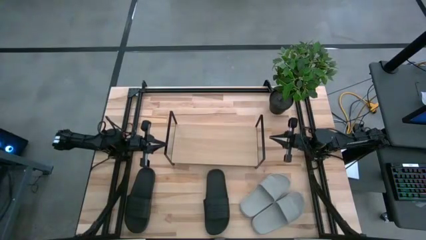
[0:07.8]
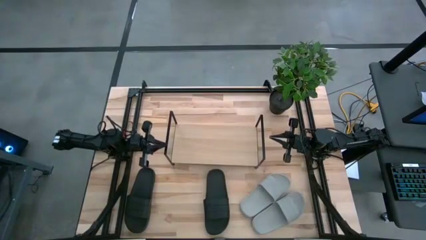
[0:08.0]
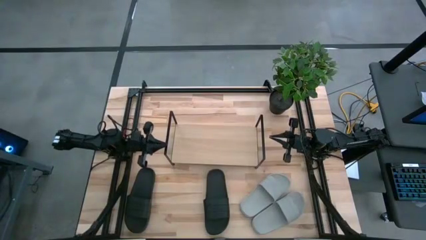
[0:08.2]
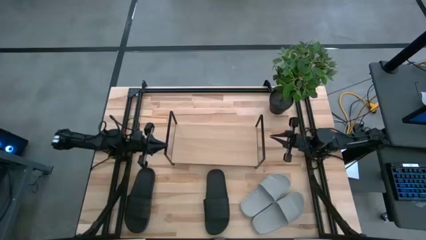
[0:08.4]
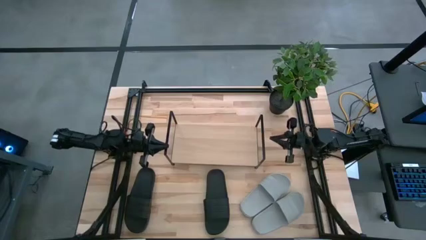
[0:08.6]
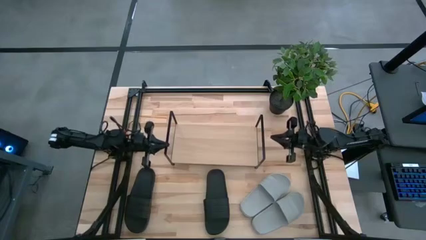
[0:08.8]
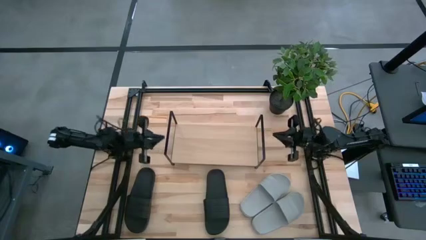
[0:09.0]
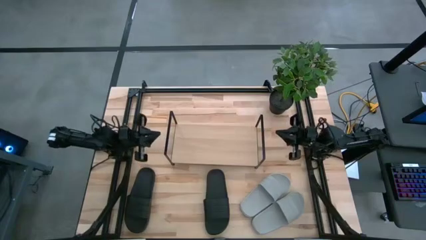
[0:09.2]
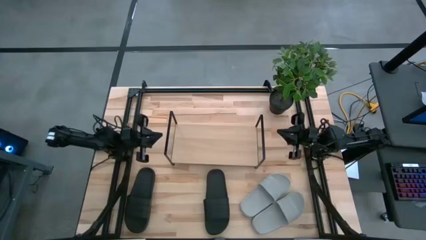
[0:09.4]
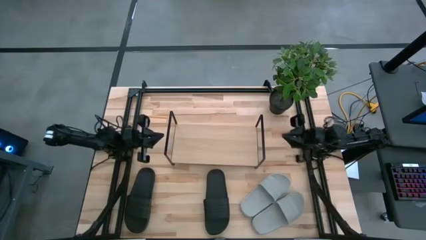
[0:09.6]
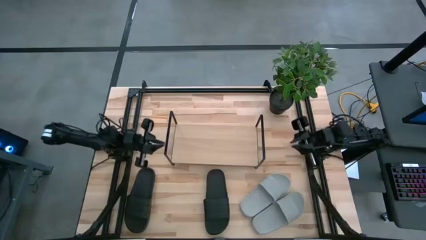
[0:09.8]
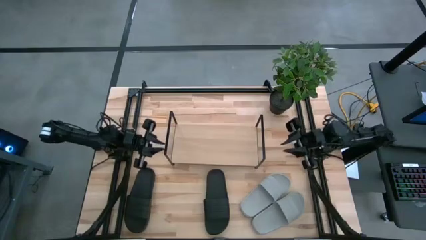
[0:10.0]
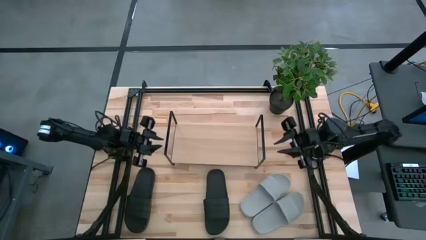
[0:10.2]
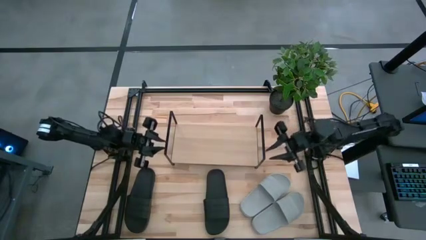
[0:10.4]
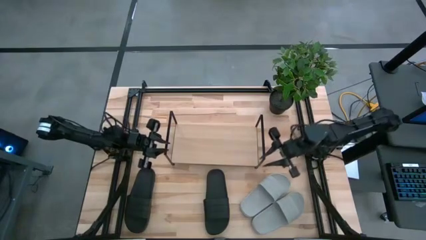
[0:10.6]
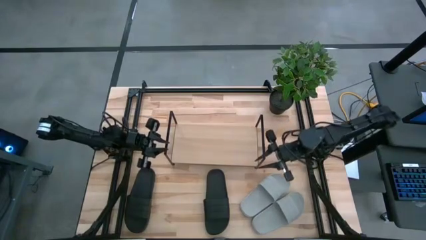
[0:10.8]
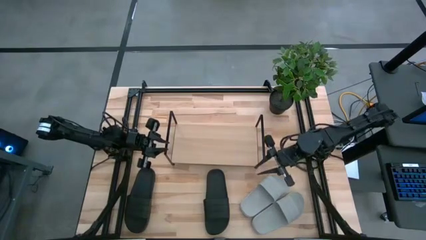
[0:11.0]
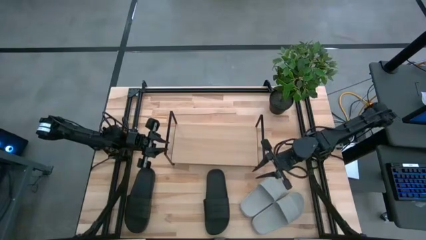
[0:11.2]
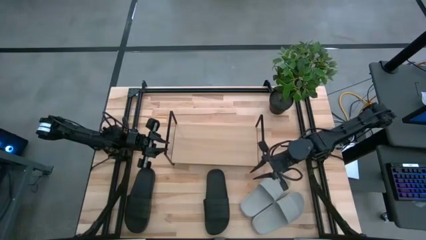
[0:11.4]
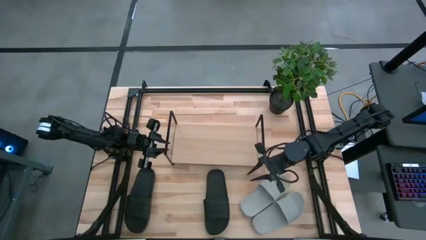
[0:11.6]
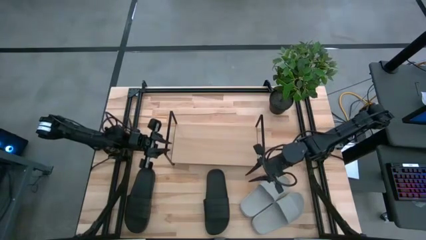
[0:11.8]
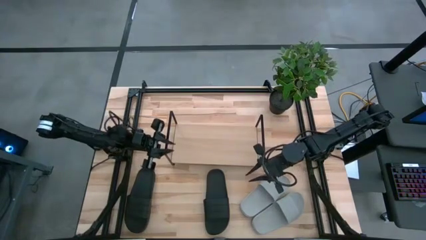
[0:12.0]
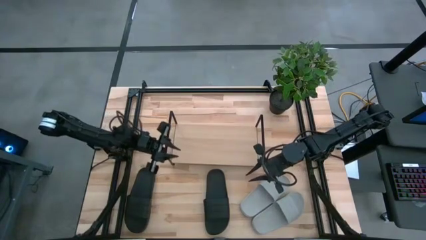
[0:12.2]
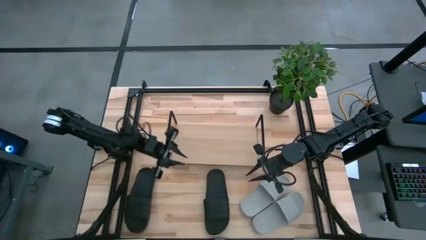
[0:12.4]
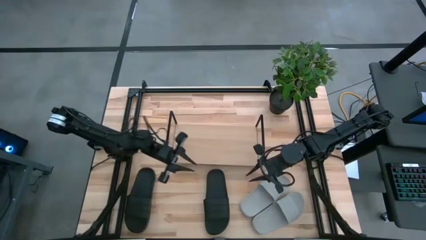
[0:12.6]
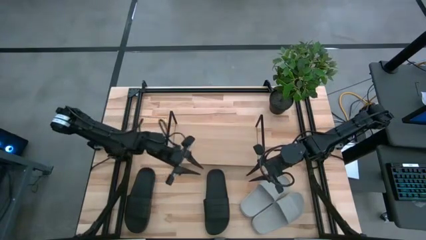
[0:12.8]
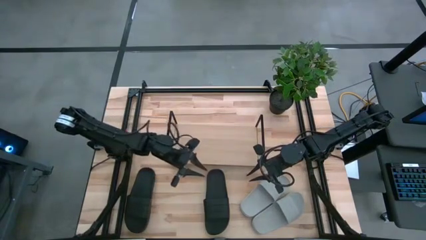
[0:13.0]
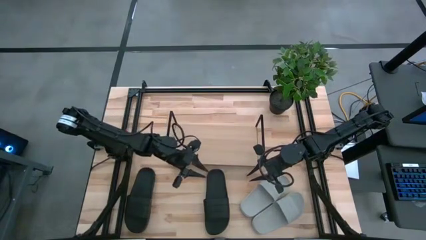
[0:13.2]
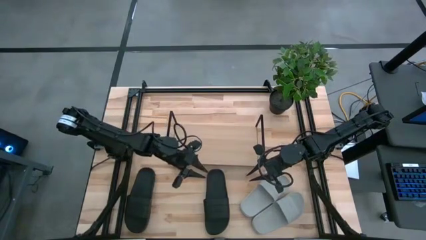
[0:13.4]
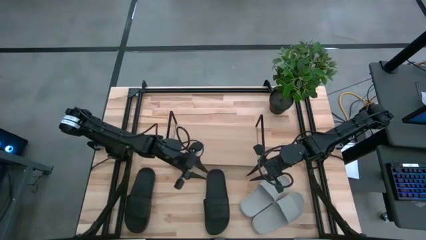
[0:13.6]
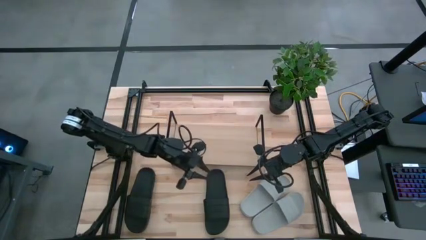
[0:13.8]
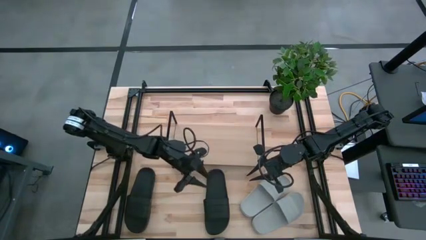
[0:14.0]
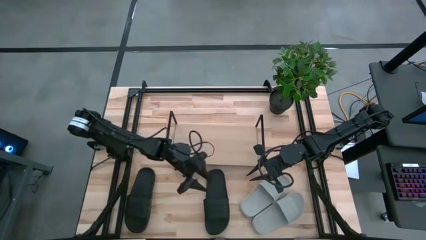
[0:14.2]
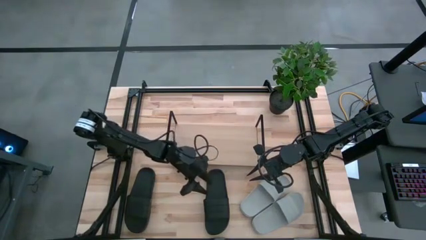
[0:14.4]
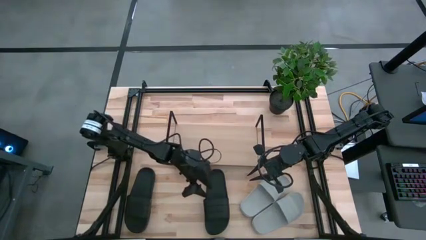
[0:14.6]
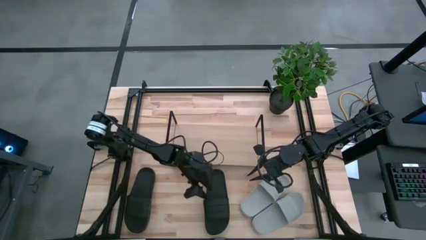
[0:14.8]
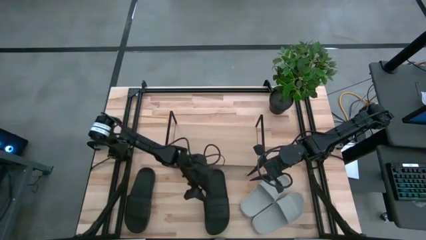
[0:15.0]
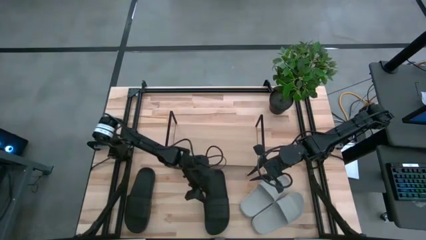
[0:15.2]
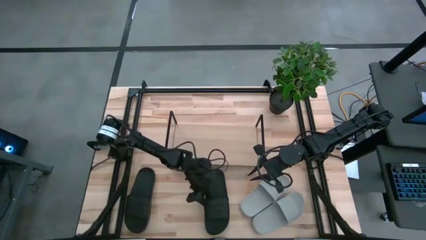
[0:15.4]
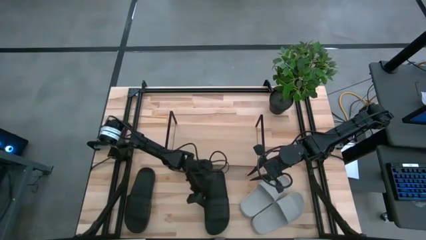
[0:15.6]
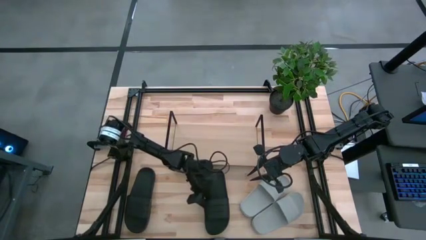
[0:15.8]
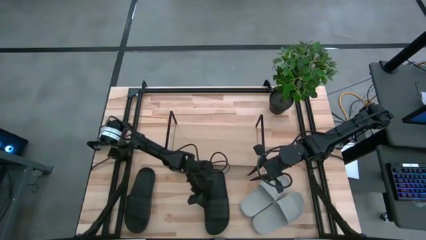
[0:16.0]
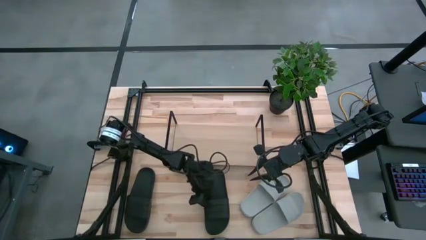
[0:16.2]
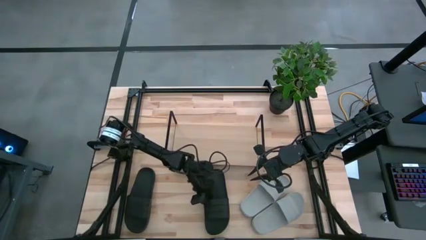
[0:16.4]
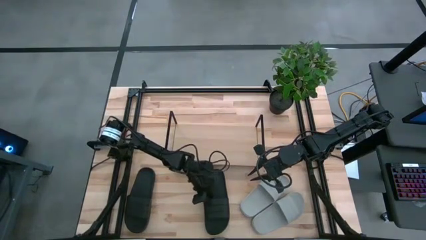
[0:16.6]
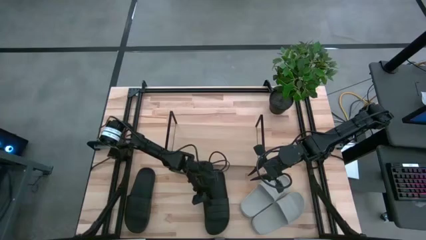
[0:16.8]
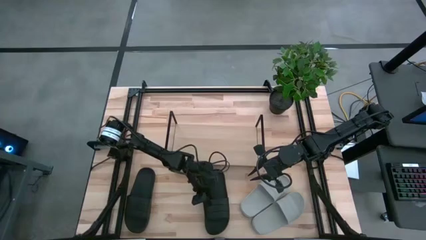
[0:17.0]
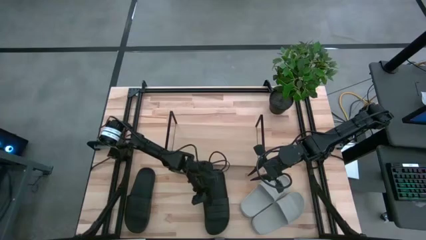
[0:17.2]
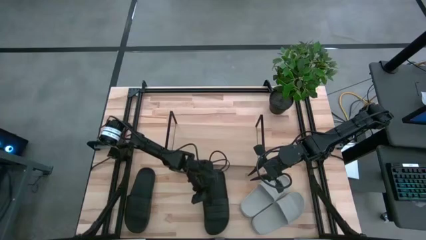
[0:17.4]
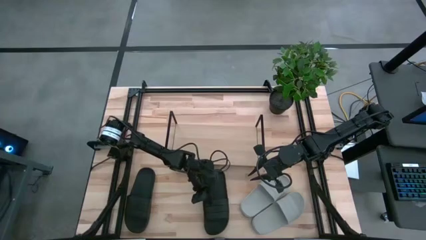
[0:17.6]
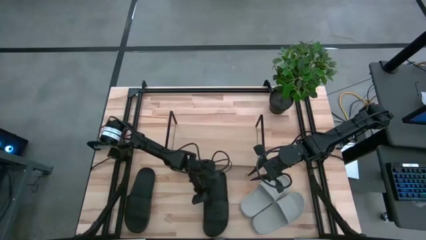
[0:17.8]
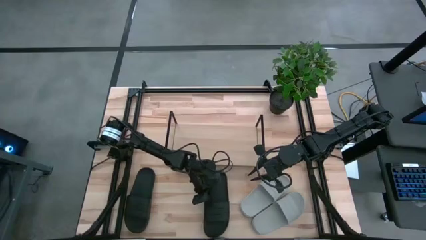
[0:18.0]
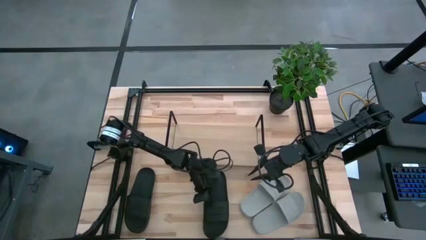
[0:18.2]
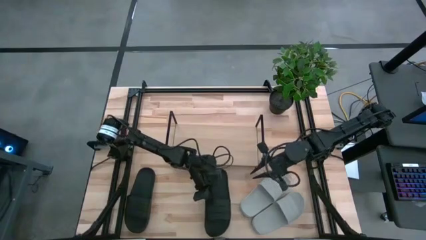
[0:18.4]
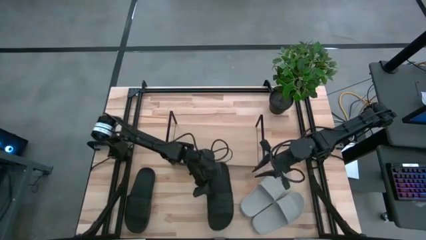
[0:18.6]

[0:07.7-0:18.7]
Task: Pick and place slides into the shelf
Put the right black slides on the shelf
